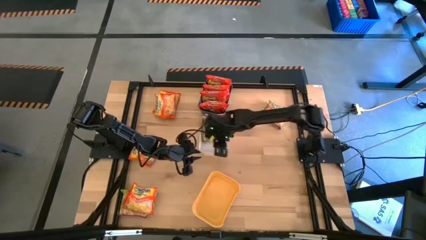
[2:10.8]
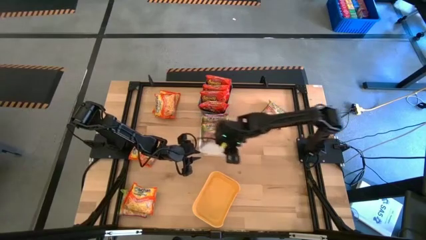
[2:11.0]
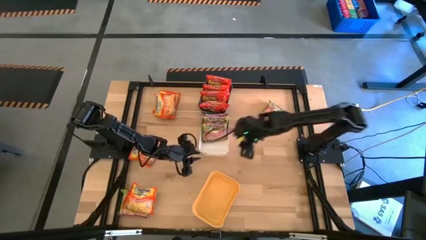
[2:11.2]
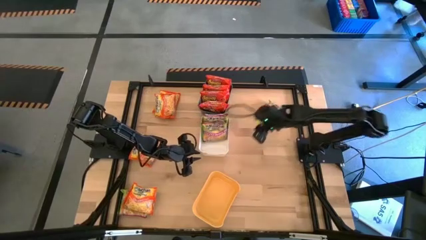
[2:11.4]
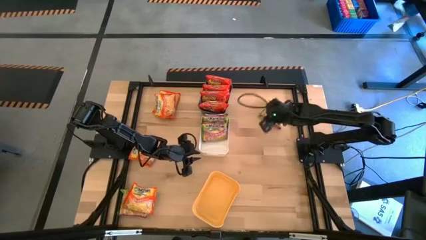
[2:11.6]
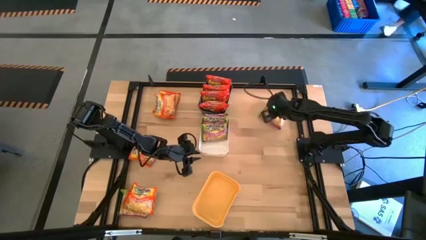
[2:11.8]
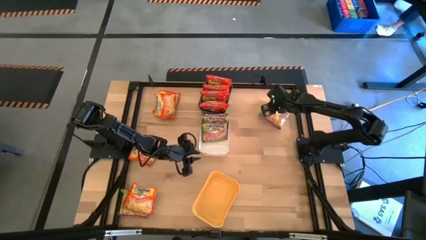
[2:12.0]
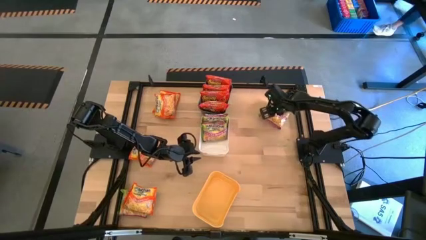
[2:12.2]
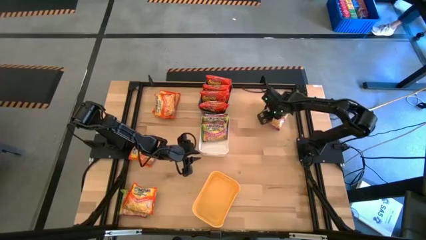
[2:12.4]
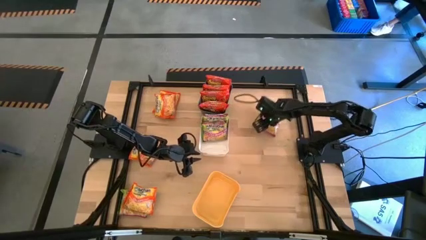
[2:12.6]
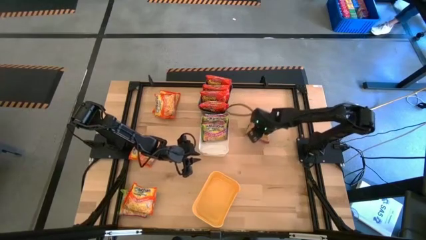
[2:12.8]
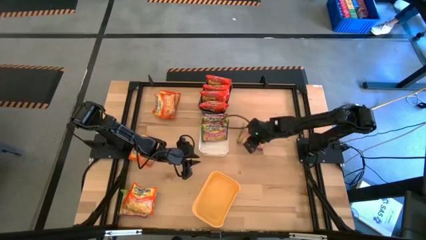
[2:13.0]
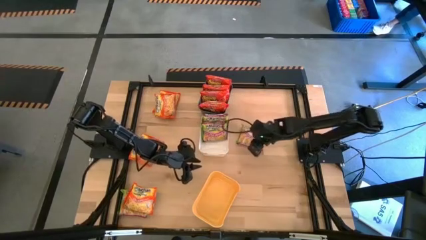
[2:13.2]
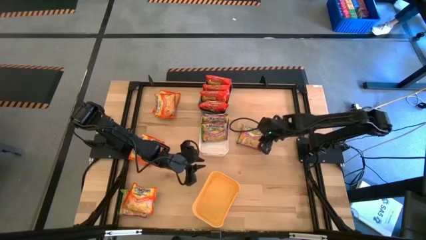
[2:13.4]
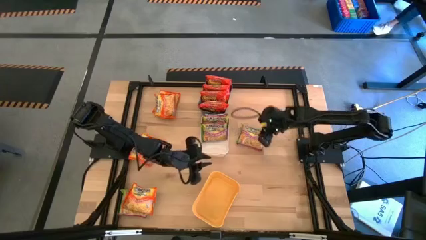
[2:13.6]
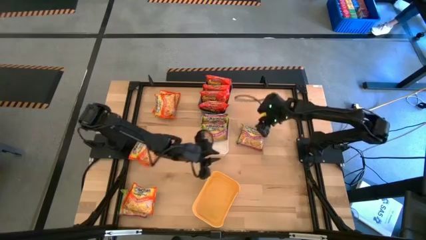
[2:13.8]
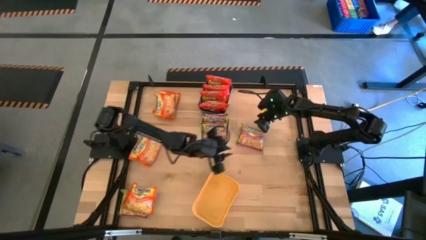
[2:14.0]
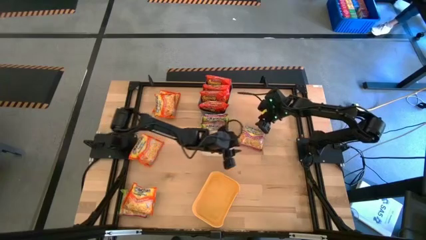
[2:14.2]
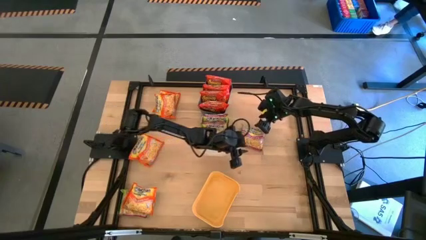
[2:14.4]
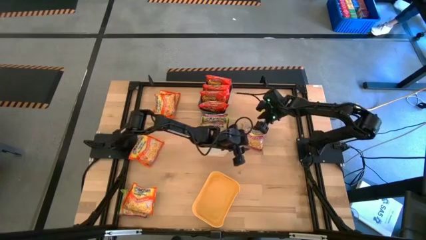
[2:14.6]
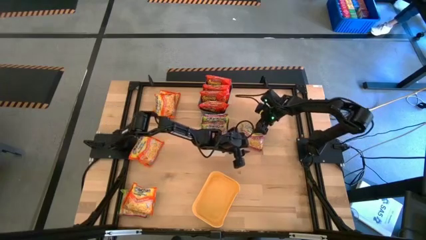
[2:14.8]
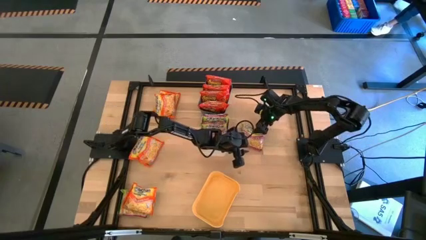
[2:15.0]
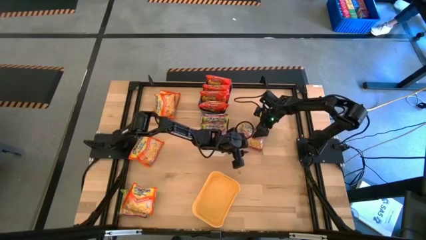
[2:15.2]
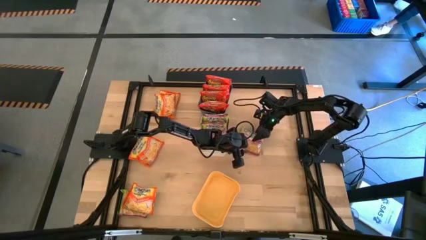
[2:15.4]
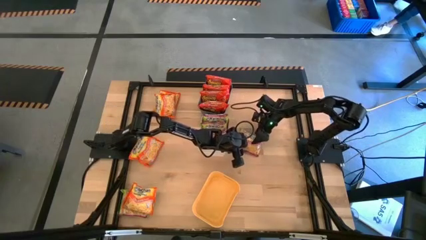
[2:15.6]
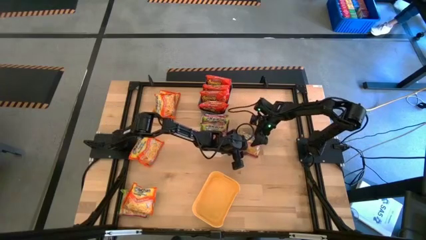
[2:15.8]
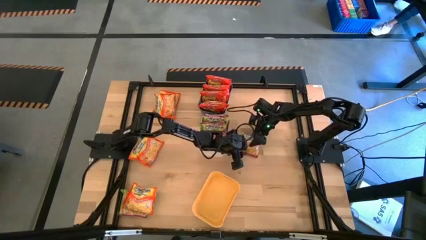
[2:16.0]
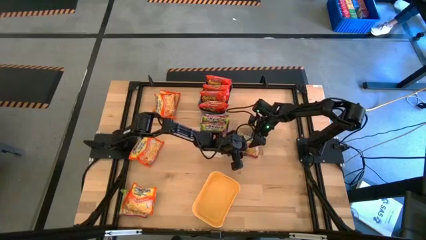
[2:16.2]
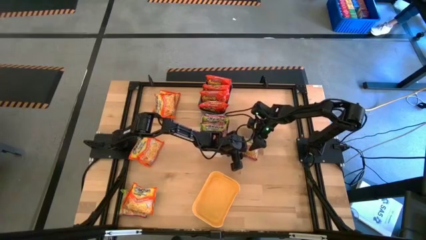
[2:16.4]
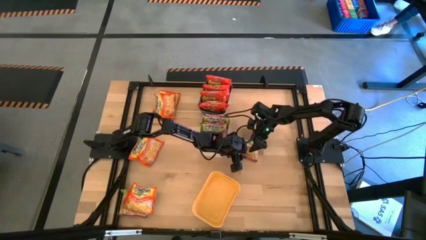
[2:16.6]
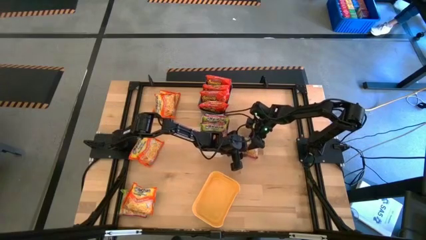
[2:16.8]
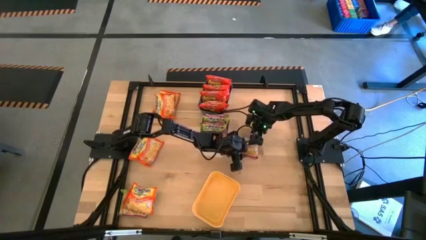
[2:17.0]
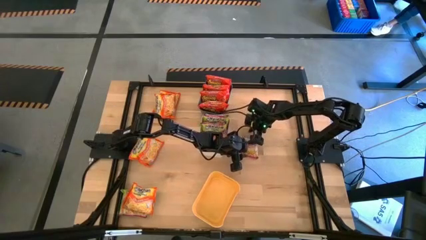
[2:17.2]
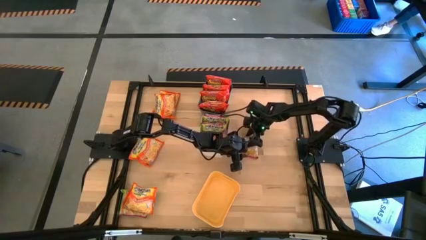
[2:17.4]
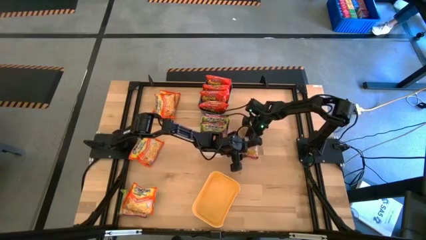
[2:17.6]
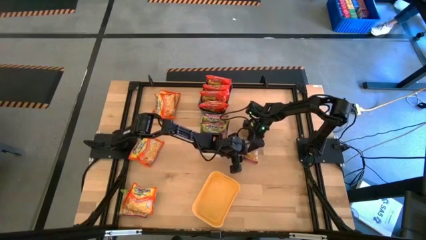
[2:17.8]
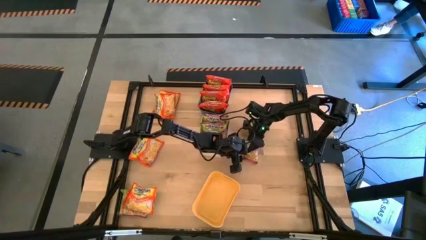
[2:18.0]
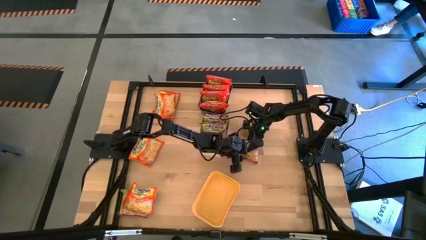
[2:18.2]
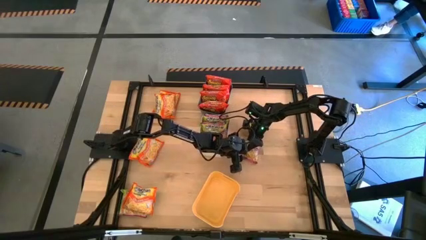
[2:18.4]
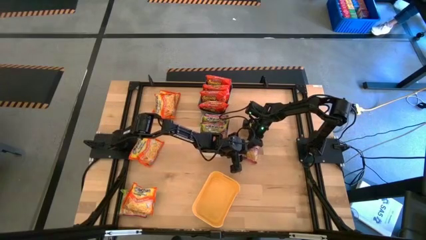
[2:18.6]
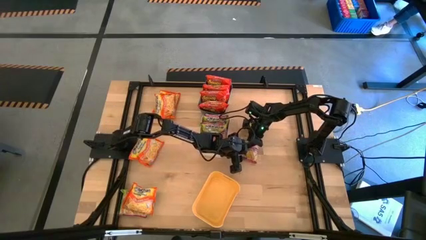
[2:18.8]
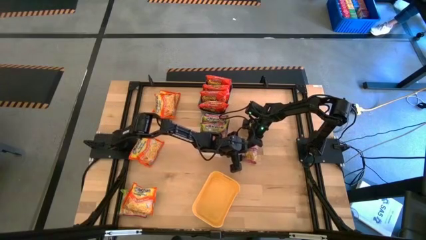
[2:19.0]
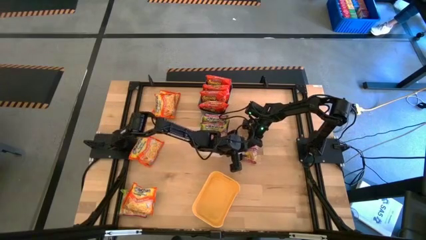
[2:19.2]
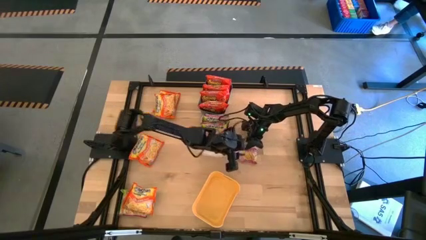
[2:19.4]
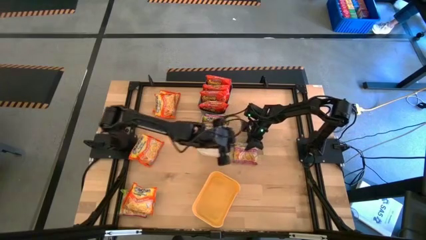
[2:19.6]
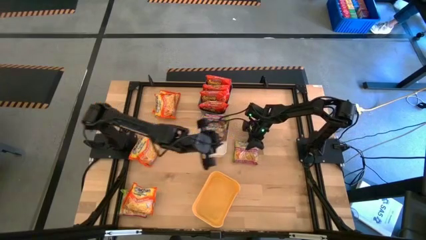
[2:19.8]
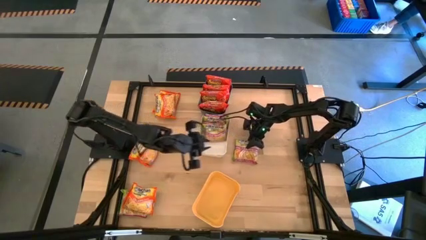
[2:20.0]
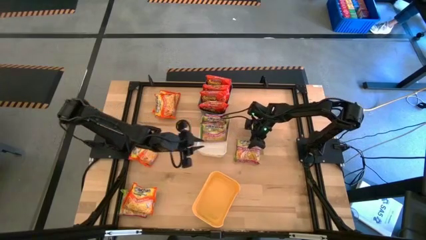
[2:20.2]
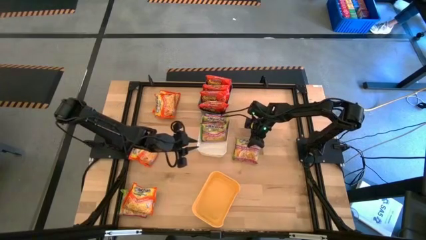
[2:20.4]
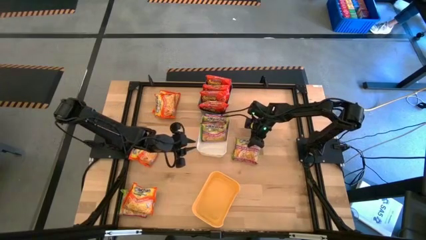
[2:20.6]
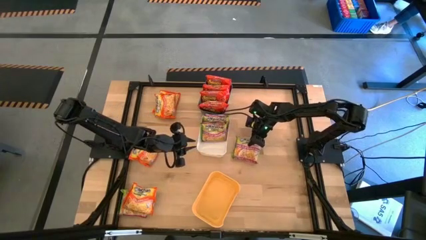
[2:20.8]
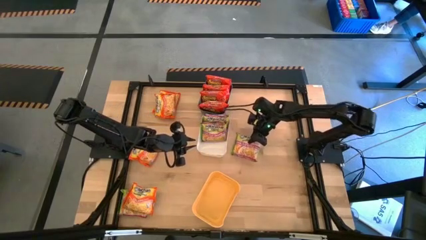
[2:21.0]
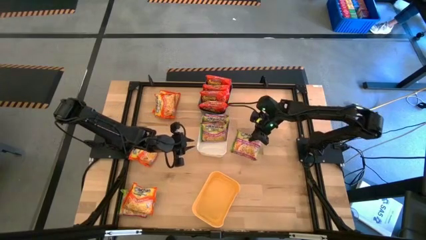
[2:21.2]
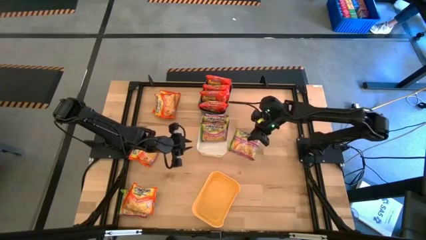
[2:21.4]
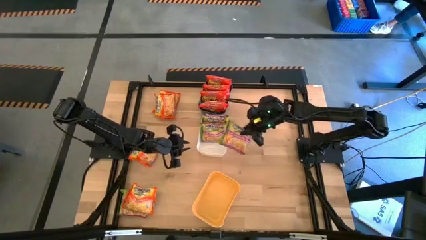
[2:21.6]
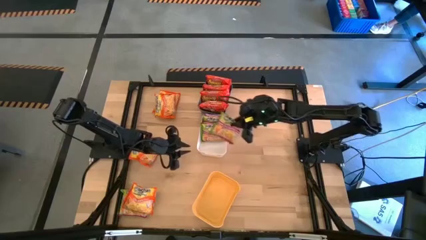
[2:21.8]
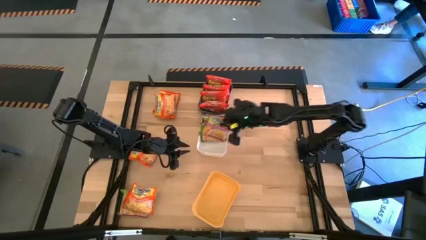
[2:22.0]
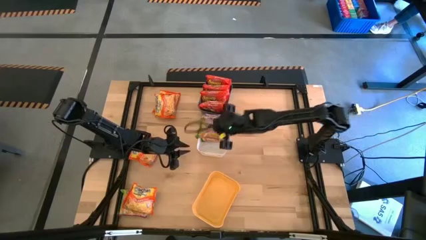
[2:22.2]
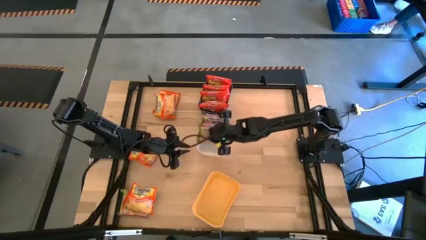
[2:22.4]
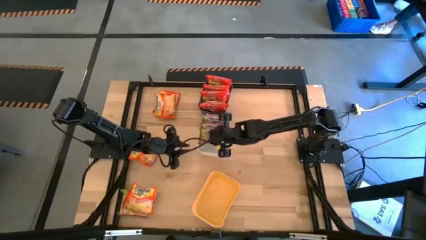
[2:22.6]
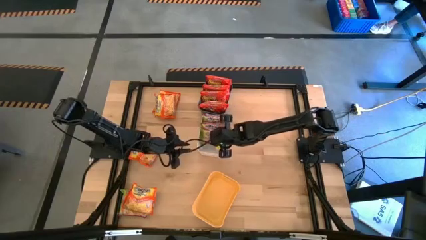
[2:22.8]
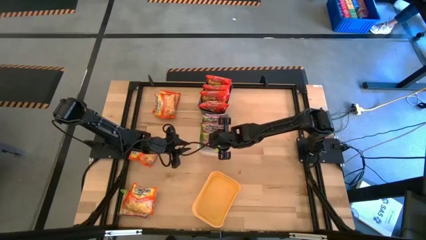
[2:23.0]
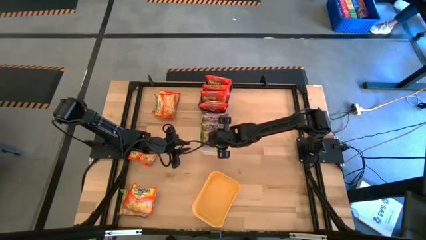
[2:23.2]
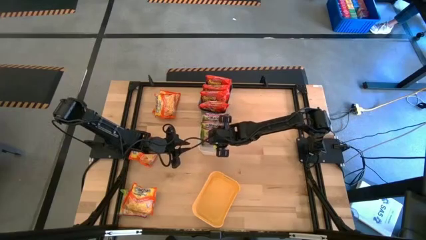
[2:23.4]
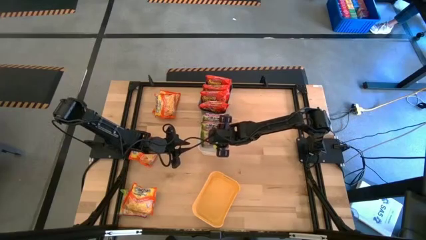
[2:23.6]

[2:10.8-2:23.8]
Task: Sort Maruchan noodles
Put the green noodle pack into the white bin
